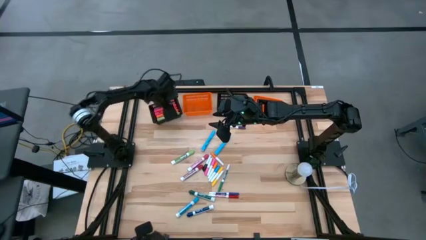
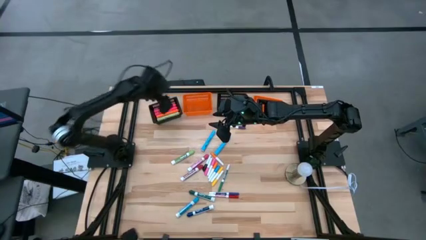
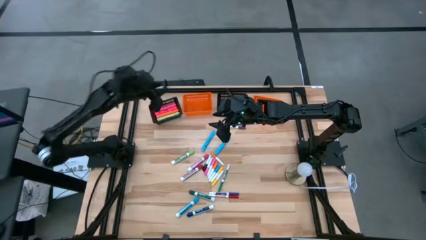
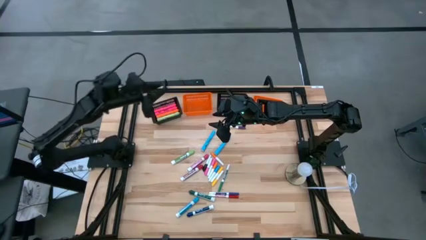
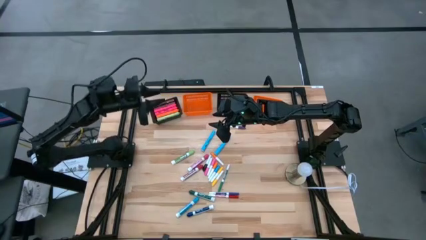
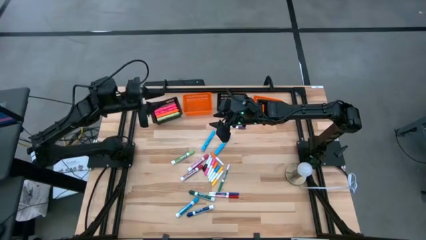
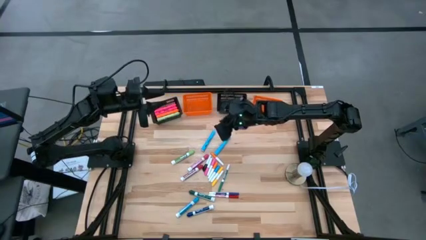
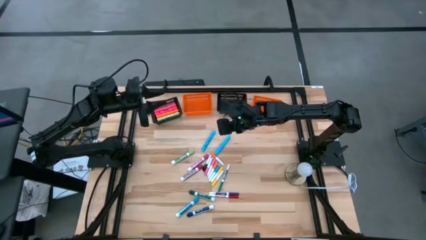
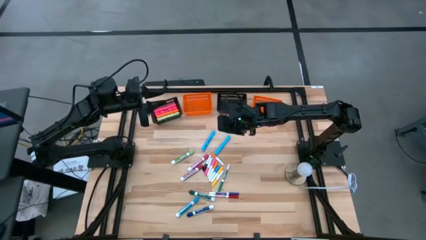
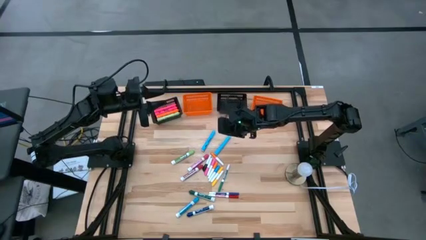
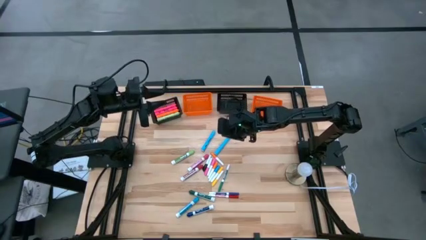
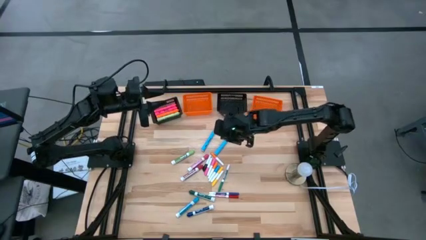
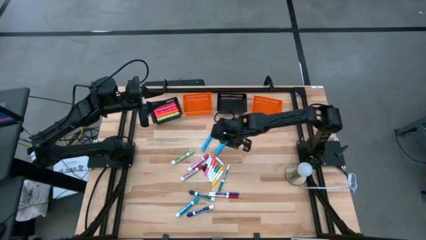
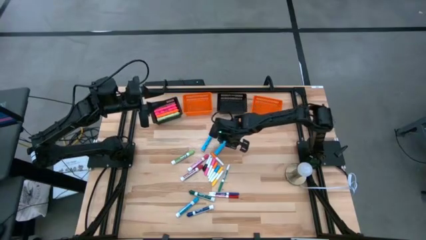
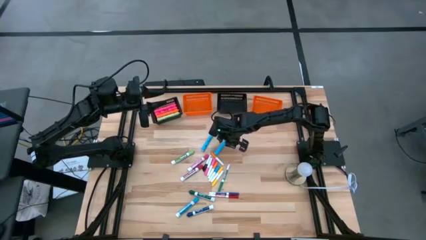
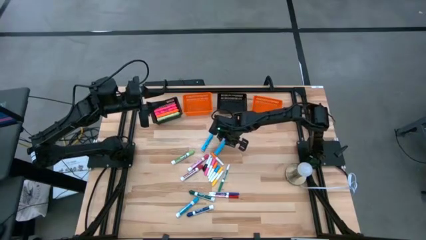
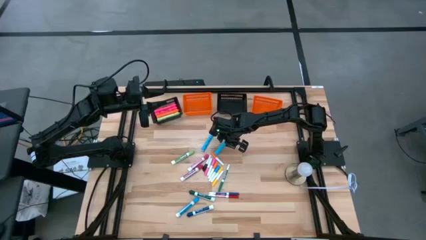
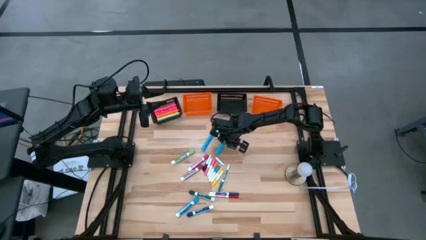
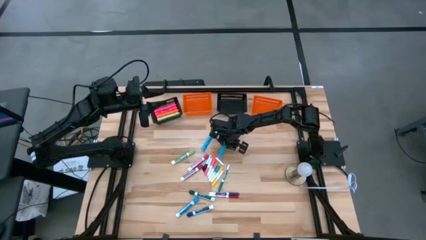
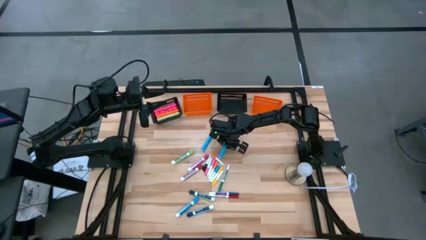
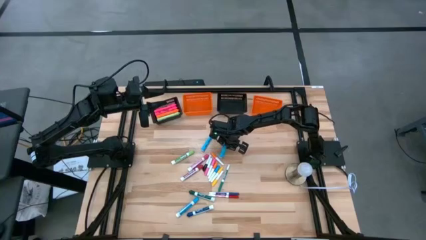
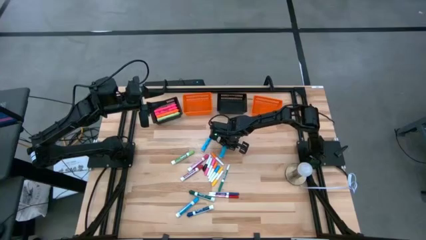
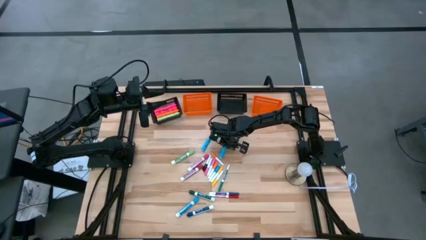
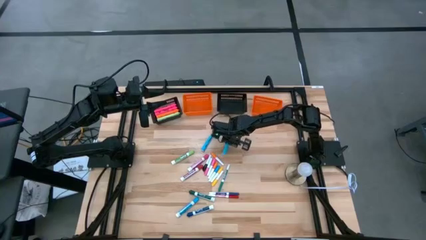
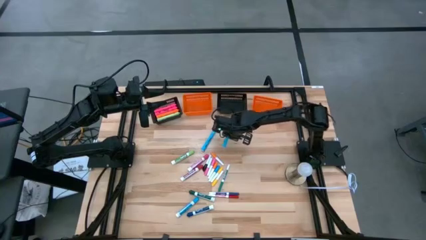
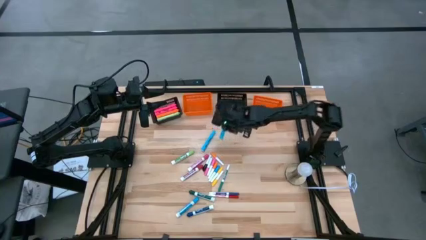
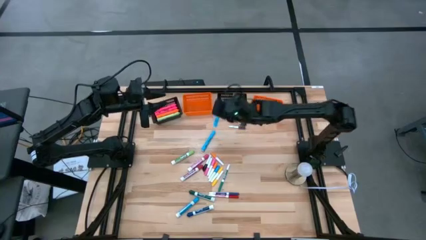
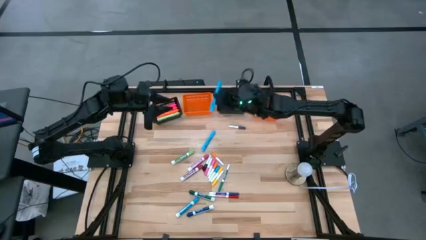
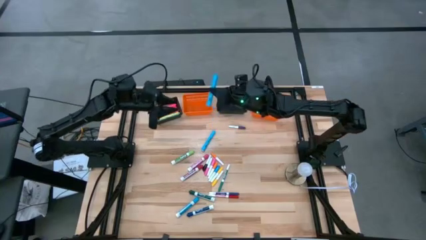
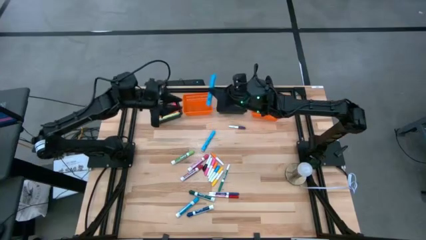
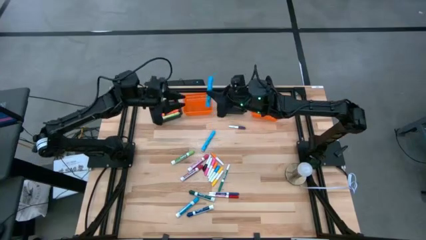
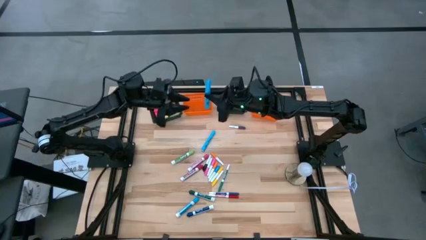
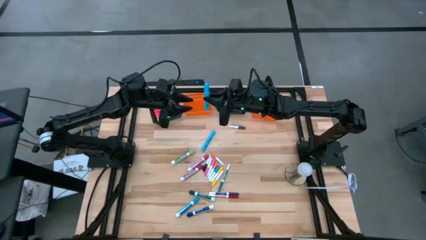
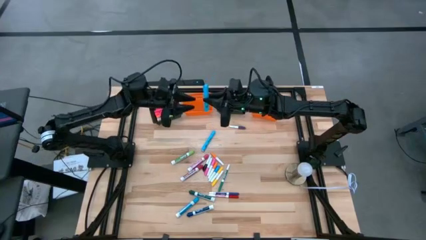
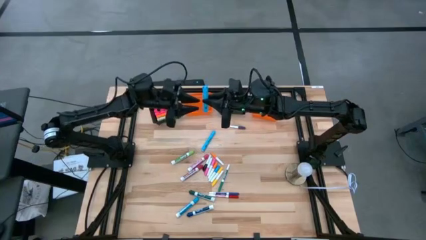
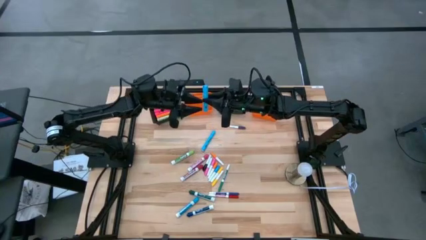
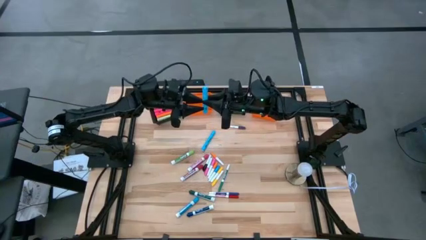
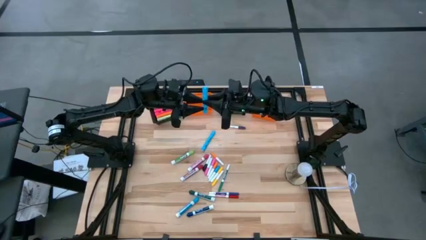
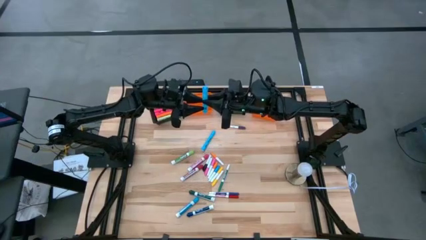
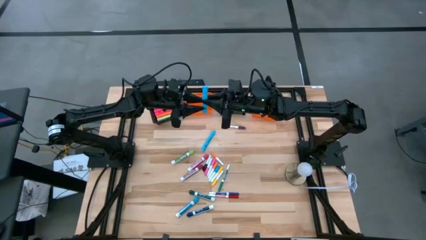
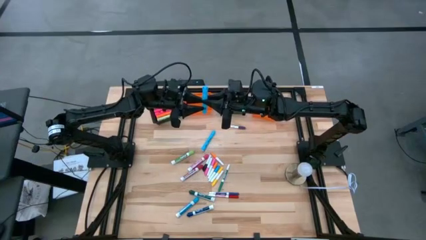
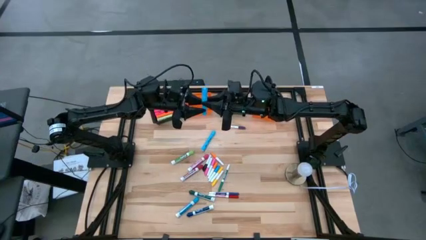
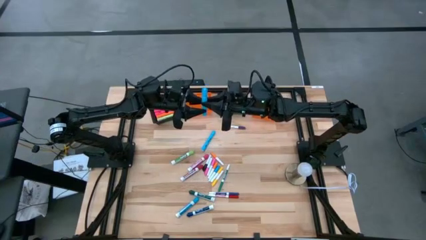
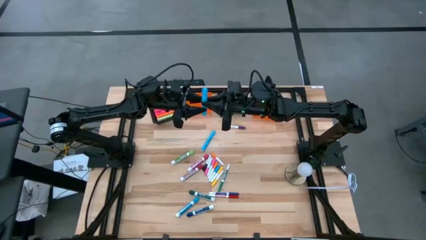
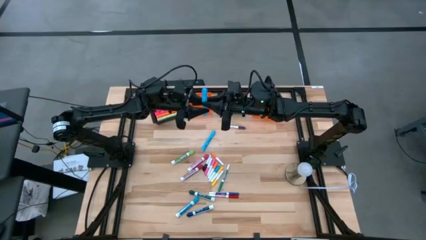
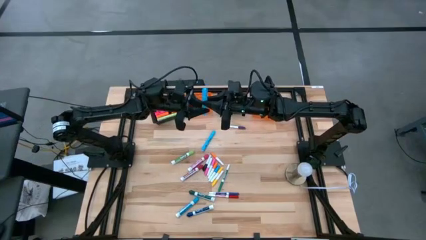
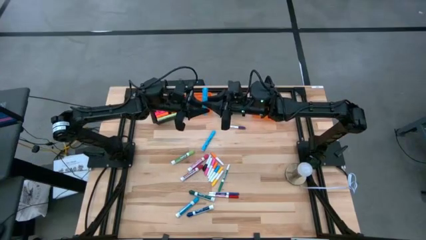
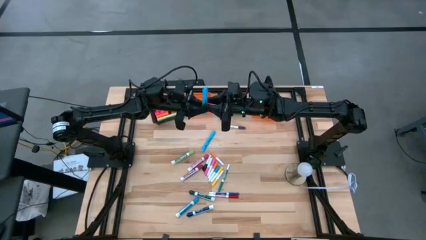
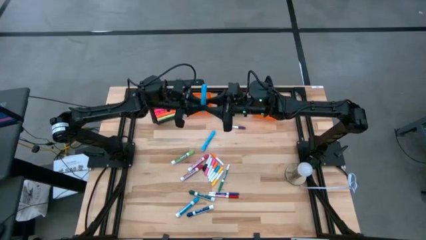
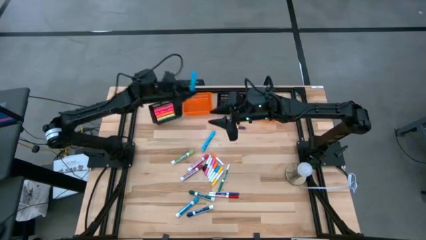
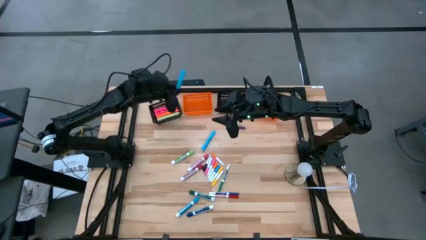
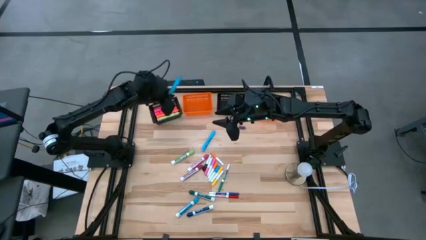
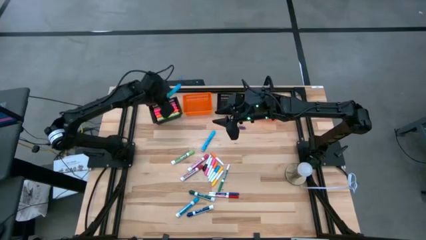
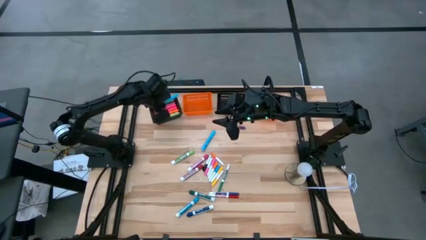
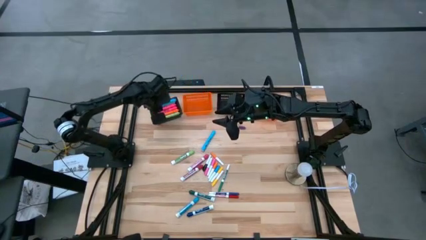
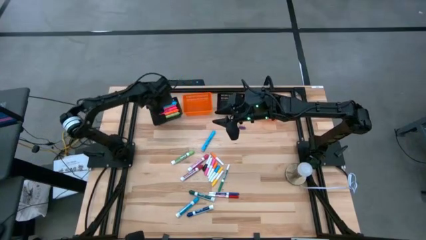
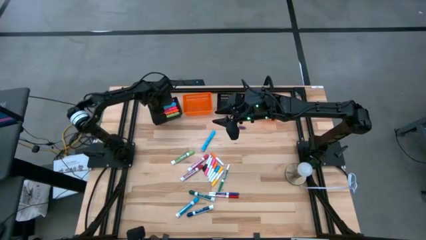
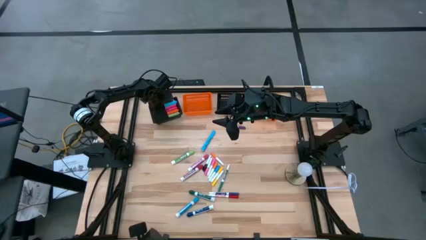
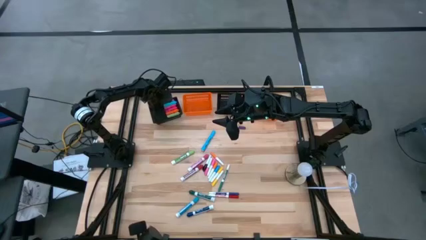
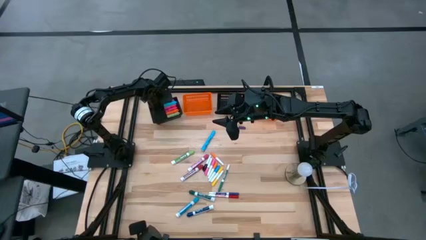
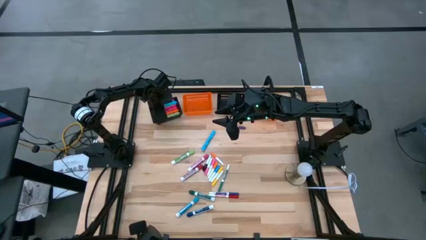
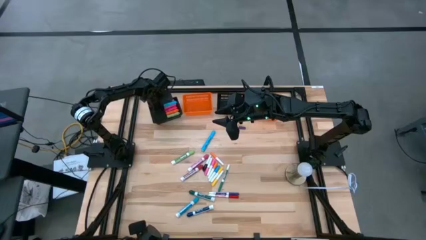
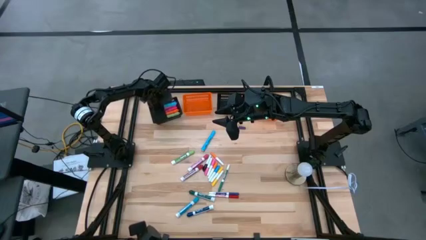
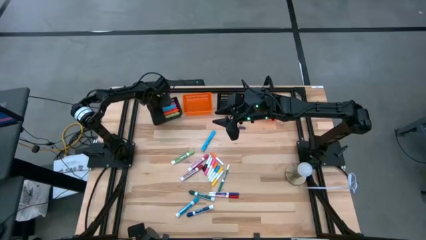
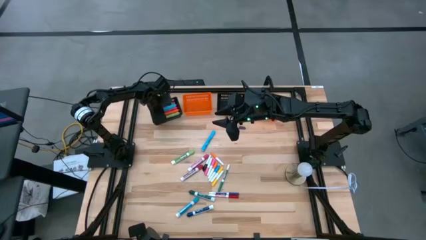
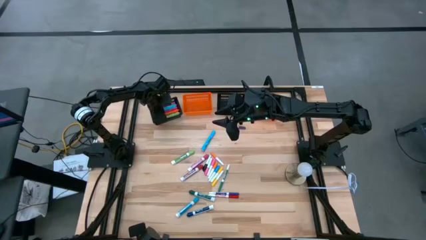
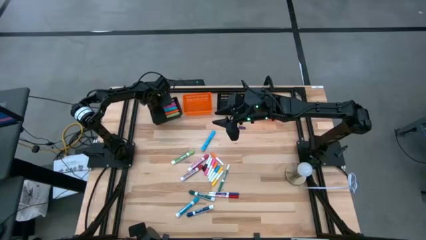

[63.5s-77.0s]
Task: Pick & Place Markers
Put the right light blue highlighter into the left black bin

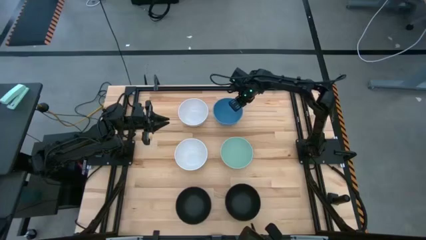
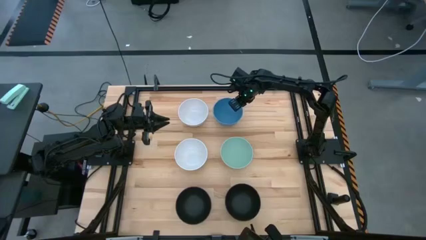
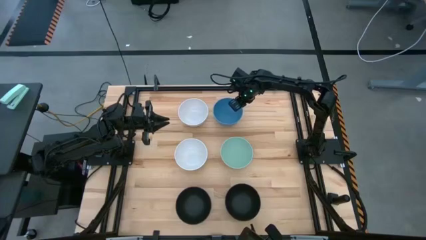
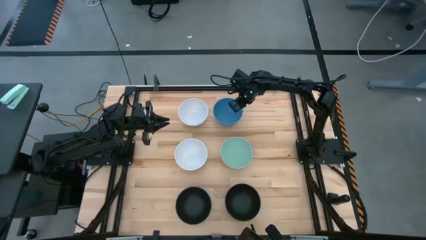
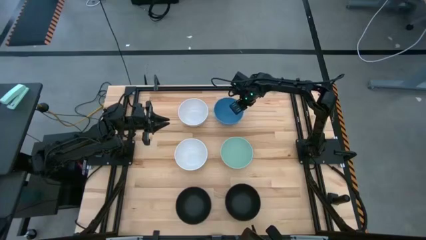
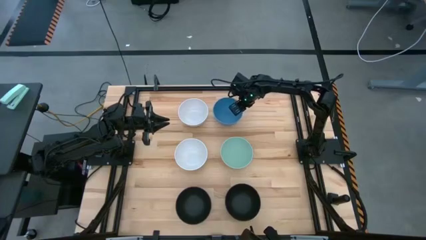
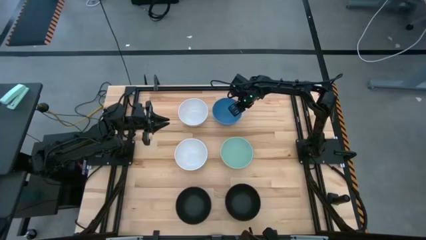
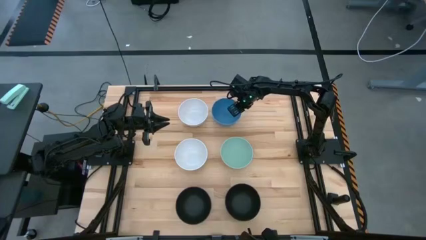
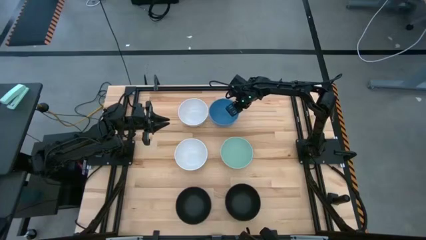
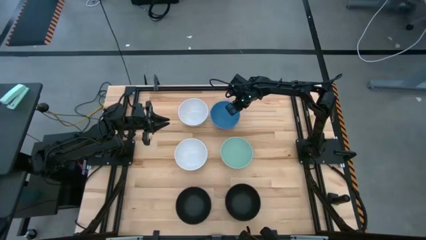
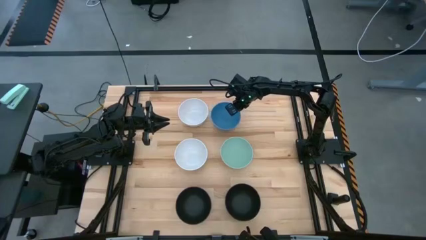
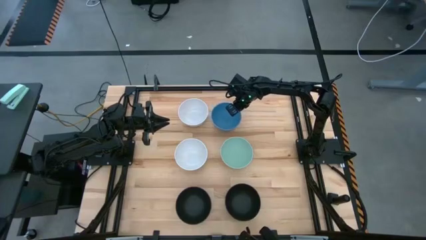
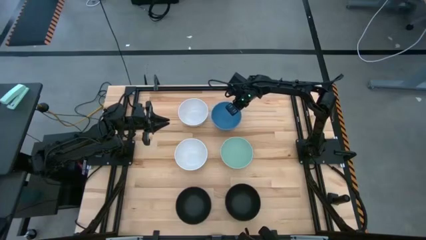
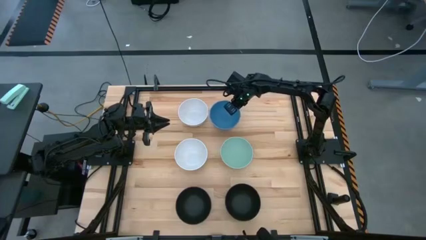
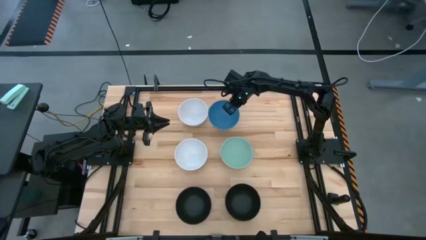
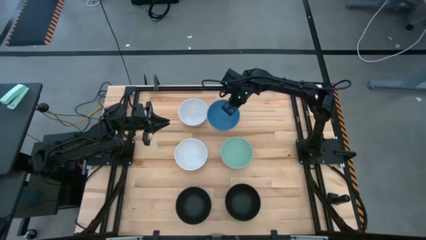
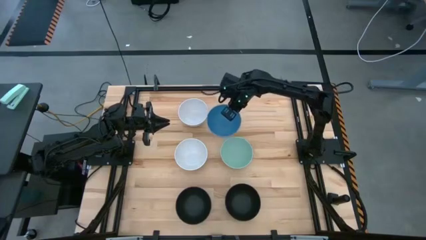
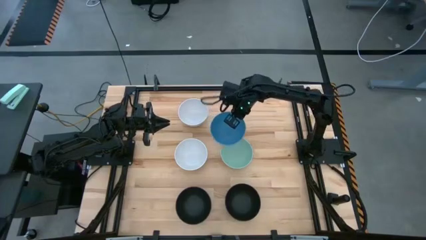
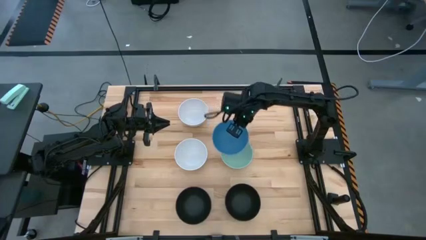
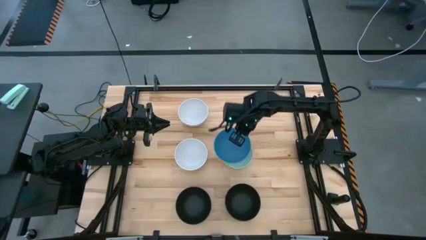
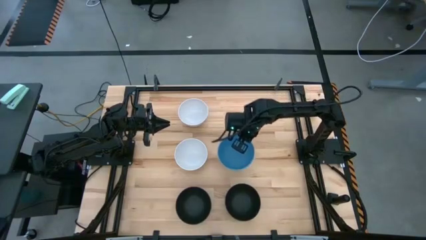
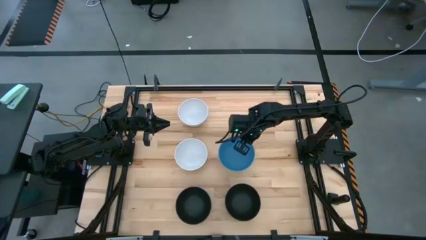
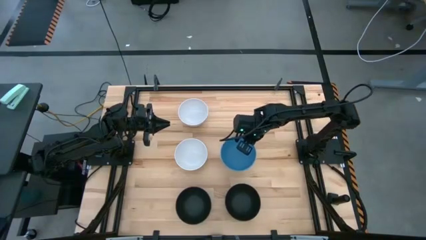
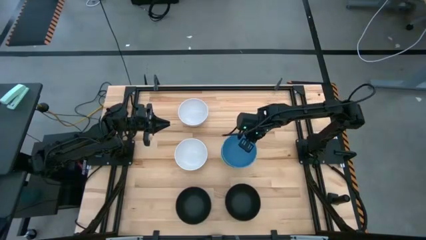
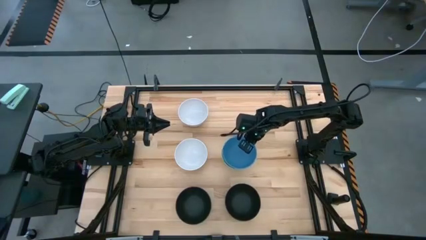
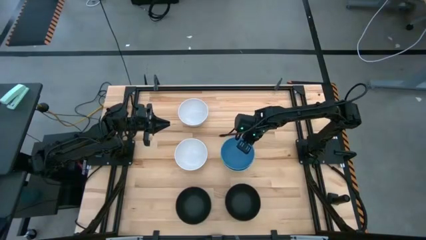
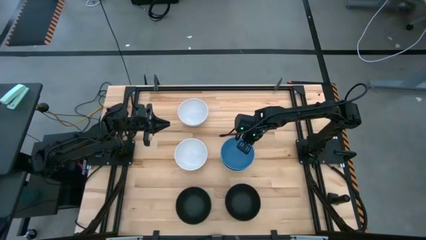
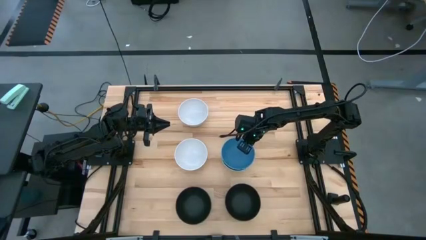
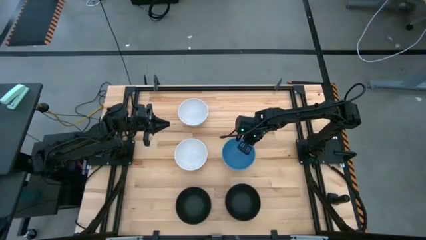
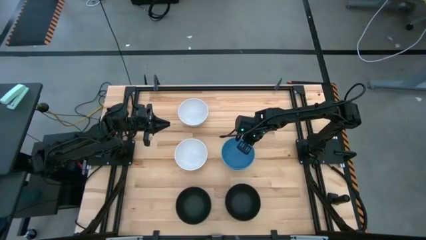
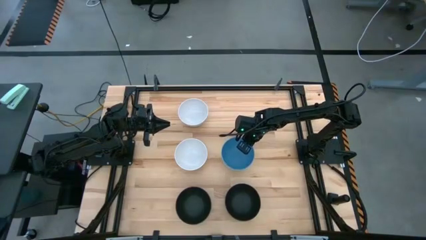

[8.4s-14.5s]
Task: Nest bowls inside each other
Stack the blue bowl on the green bowl
